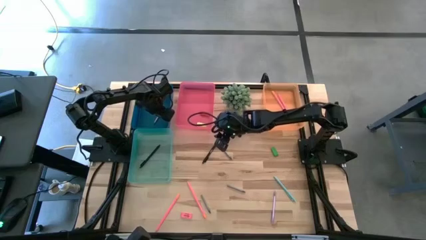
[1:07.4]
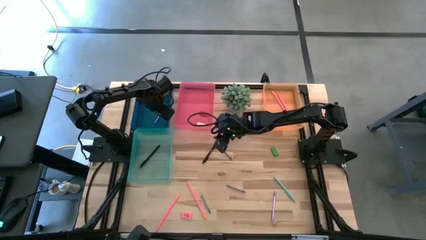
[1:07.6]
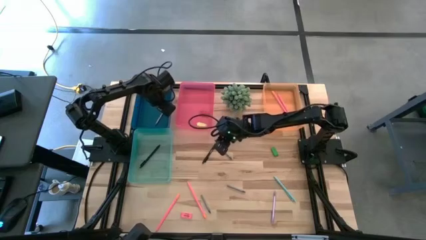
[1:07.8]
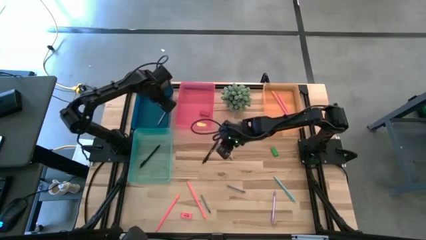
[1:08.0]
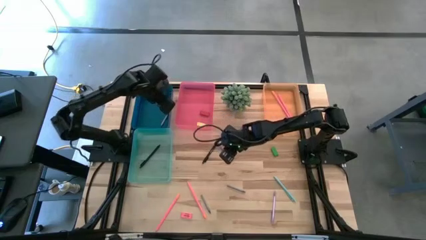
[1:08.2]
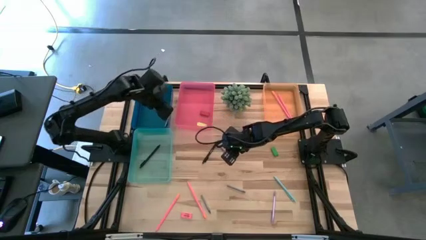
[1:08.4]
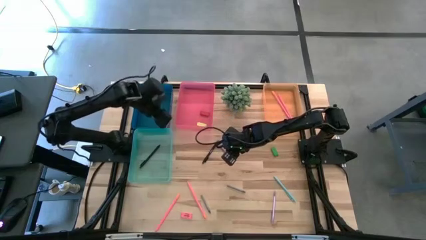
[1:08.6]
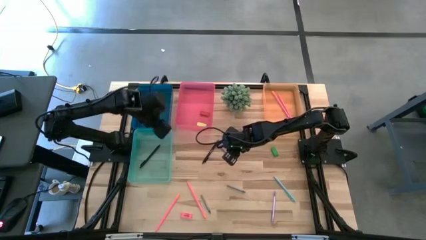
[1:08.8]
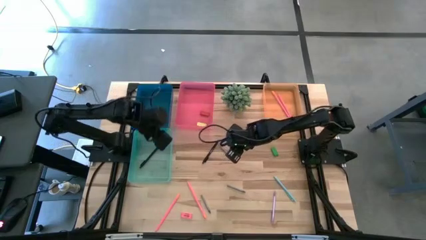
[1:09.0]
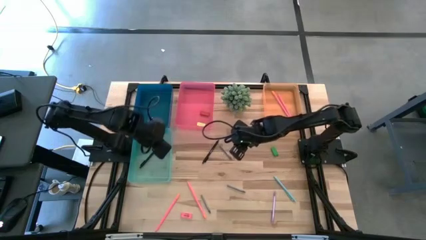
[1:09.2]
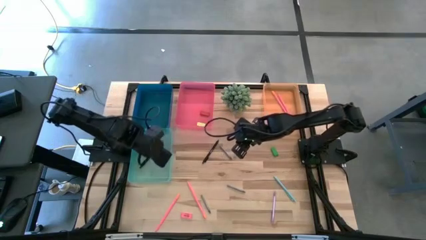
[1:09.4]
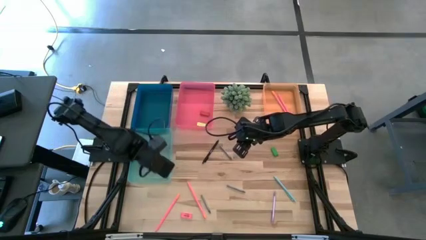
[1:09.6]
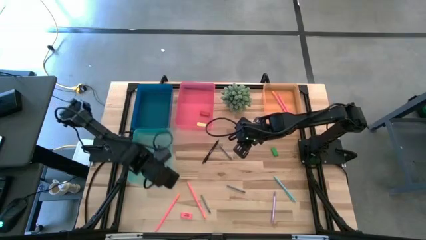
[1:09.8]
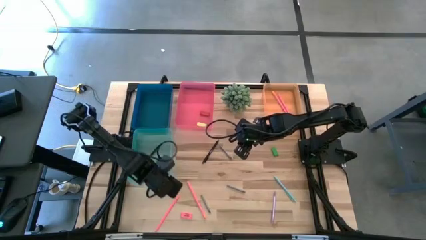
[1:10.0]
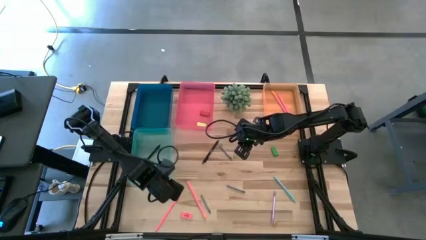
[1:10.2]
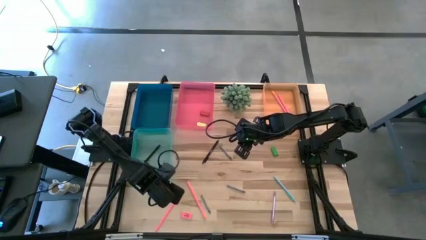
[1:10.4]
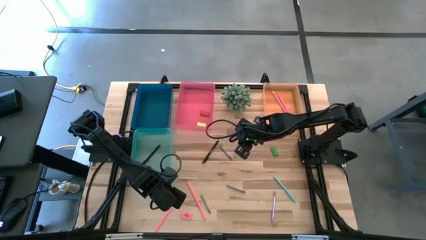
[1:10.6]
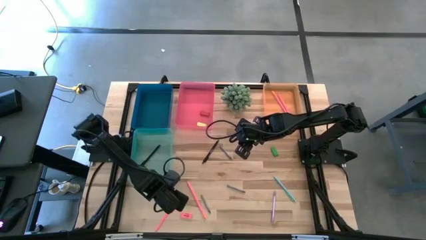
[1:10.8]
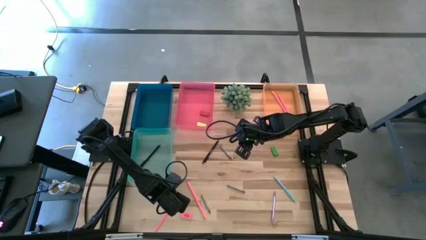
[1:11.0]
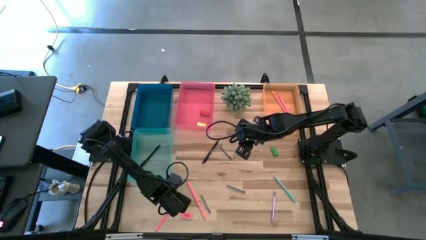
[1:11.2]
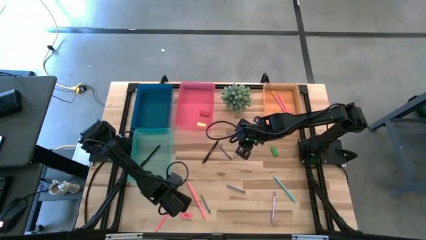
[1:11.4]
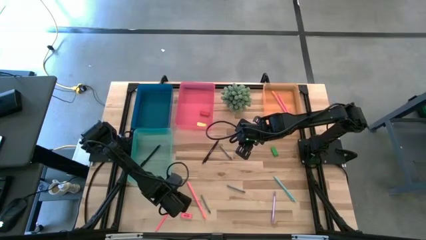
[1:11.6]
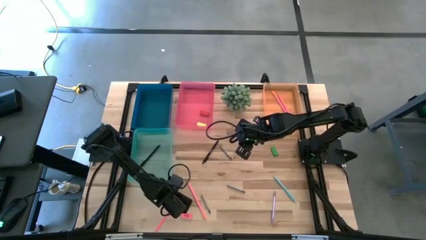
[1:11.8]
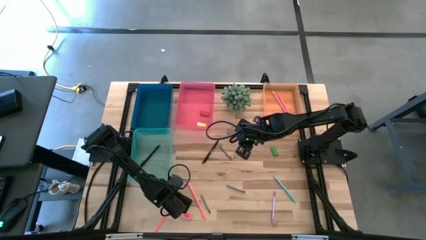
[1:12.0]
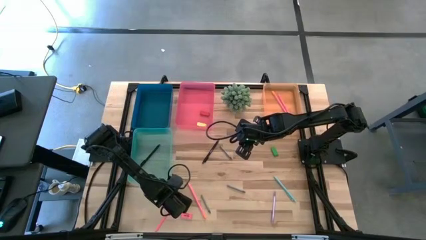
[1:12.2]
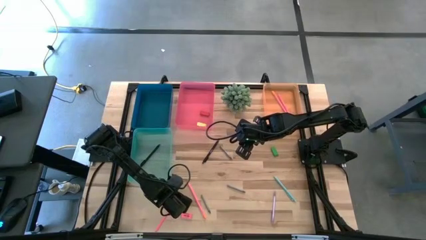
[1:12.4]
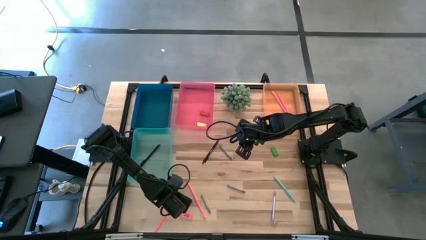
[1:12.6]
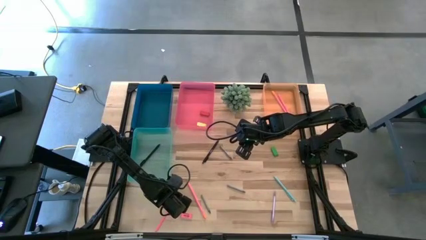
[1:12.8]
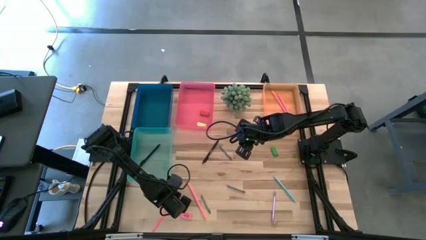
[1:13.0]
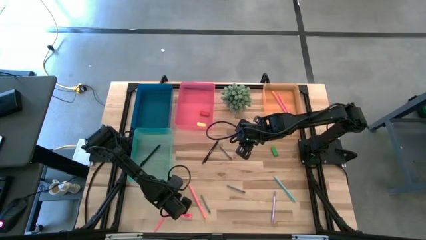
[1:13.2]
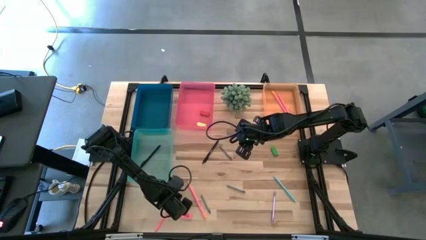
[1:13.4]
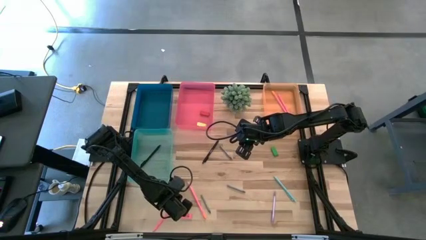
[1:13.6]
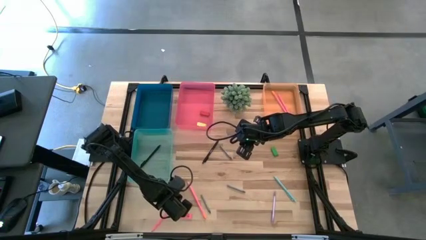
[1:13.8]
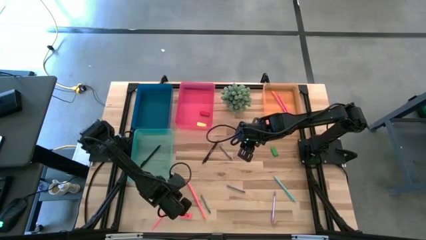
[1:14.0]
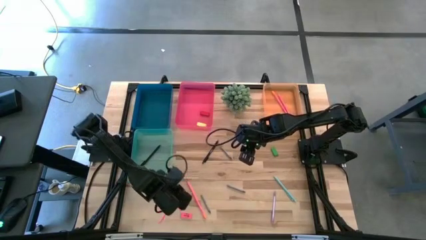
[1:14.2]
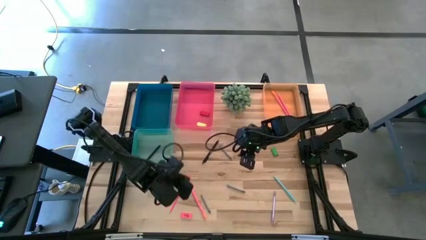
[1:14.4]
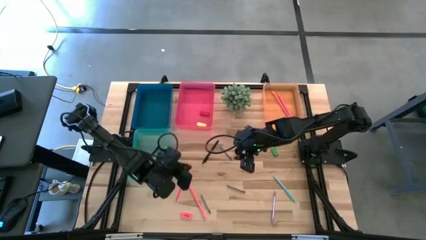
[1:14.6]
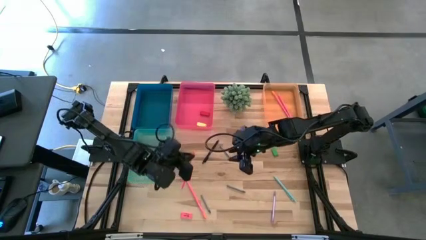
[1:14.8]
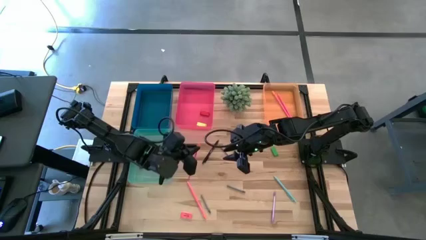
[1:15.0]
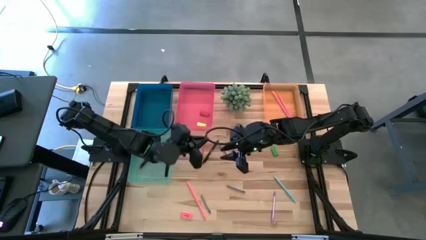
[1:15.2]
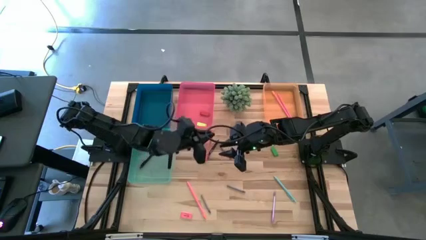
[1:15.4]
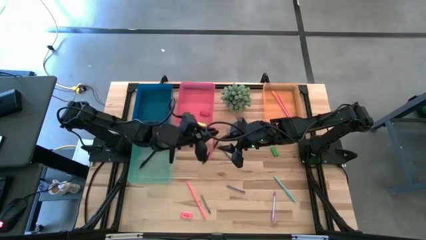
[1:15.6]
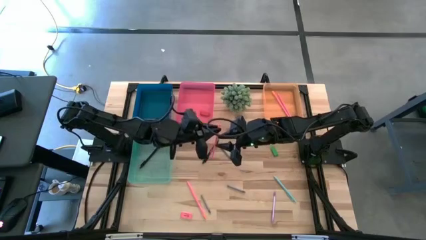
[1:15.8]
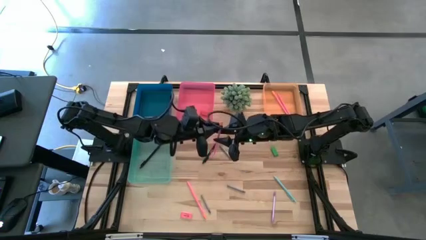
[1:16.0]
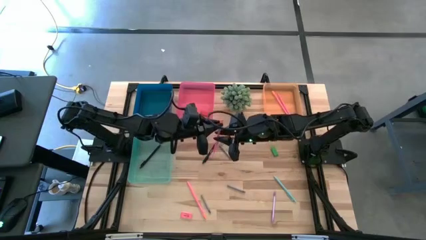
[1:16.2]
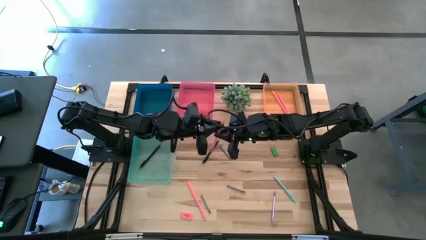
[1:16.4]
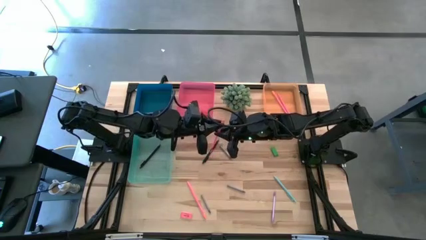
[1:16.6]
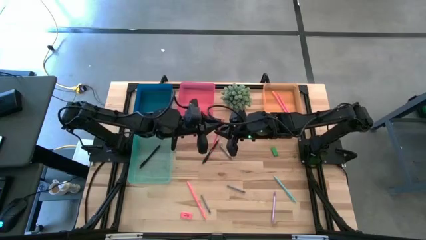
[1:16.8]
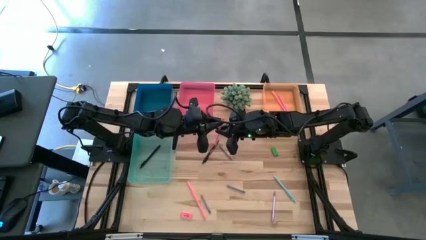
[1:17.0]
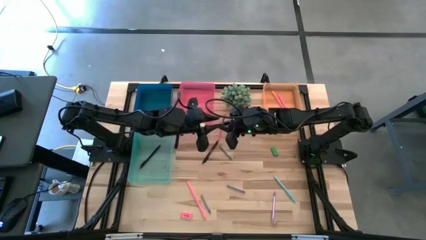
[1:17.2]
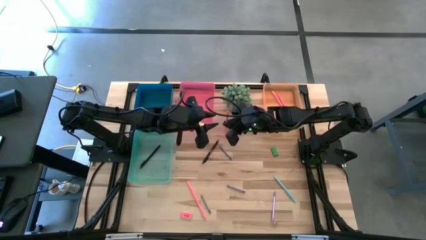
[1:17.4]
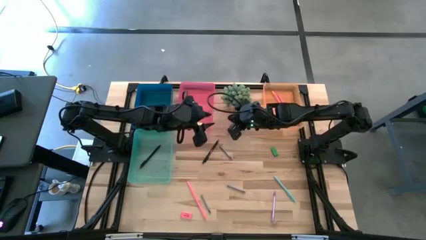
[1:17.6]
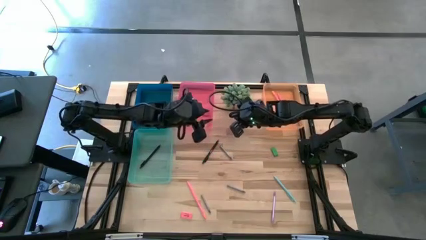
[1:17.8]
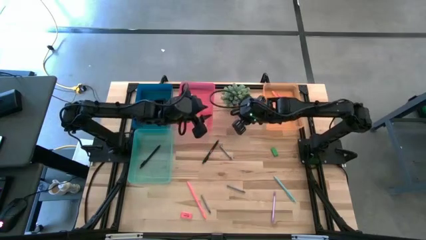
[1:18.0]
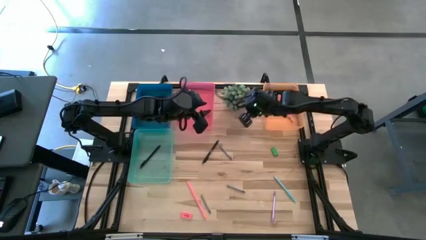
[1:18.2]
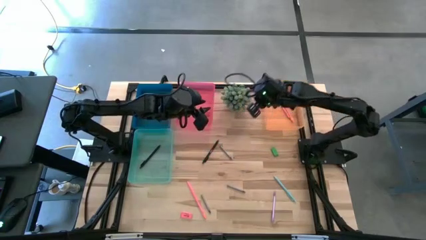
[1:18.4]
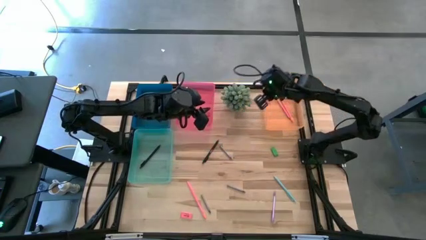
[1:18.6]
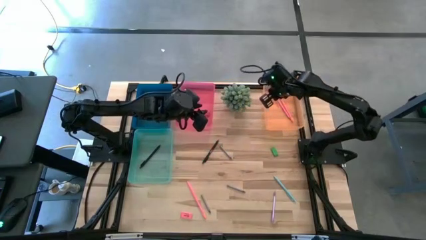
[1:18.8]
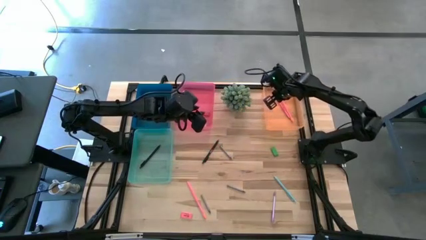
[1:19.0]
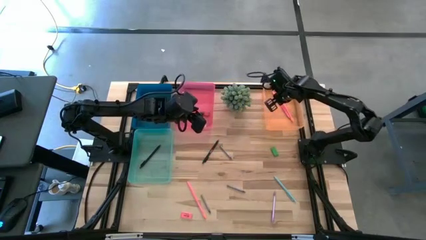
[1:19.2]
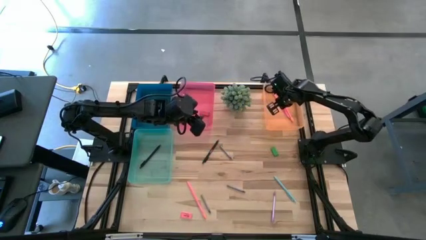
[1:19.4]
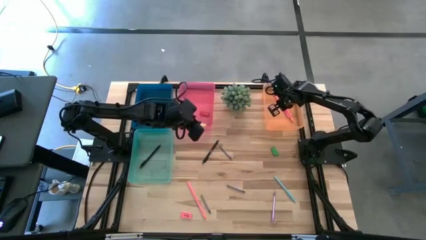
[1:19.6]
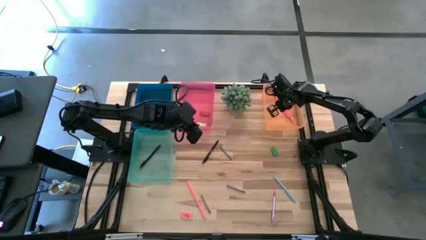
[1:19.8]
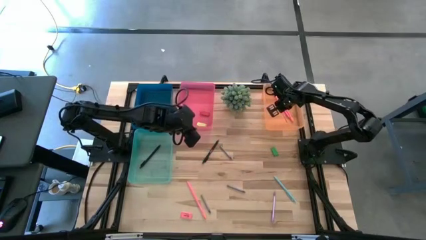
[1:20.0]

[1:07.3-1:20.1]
Task: Sort crayons/erasers/pens/pencils in bins
Put the pink pencil into the orange bin

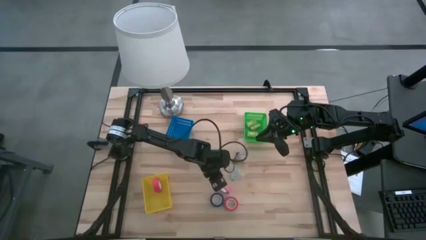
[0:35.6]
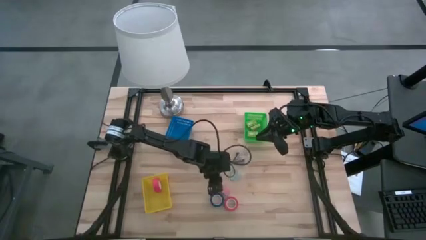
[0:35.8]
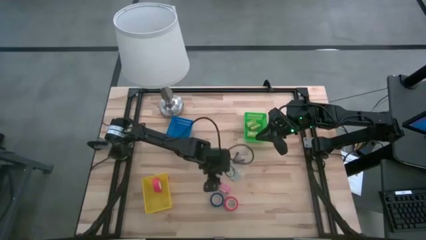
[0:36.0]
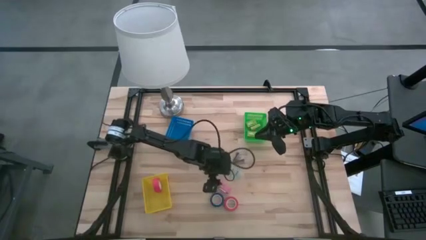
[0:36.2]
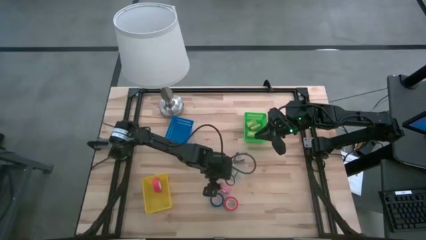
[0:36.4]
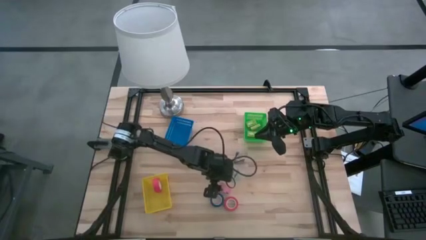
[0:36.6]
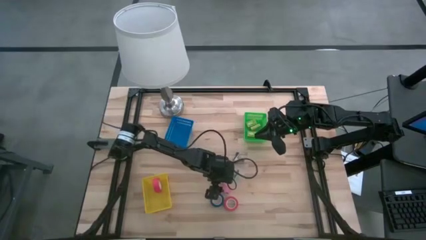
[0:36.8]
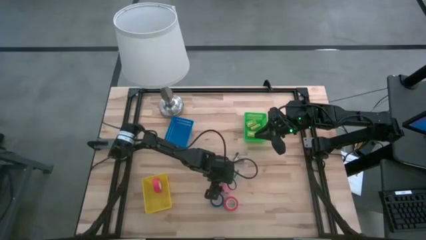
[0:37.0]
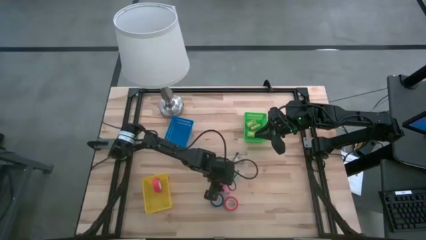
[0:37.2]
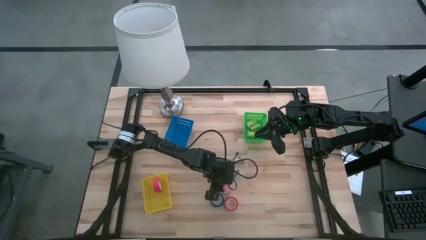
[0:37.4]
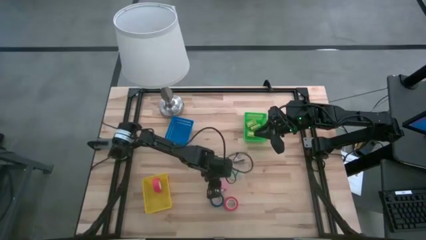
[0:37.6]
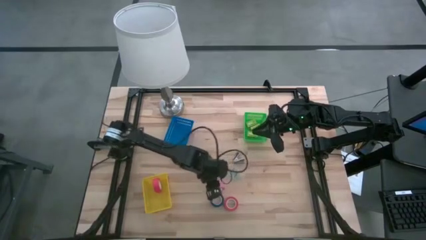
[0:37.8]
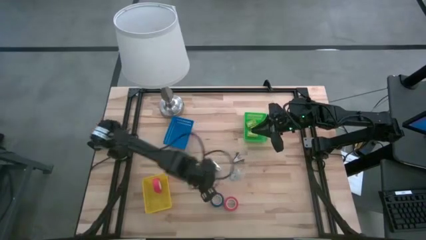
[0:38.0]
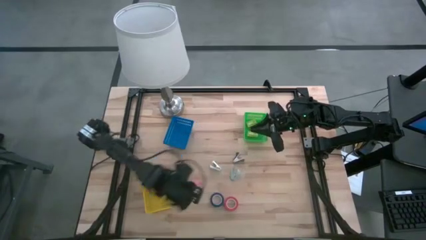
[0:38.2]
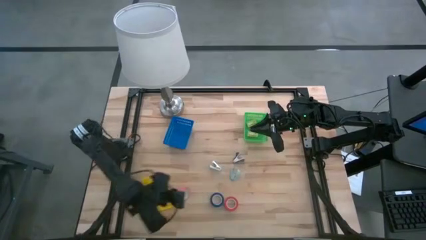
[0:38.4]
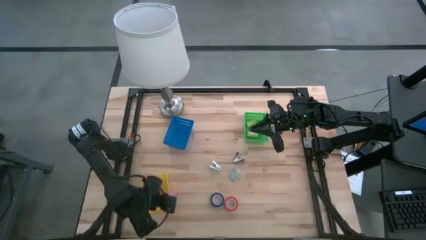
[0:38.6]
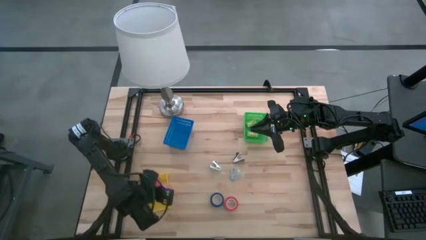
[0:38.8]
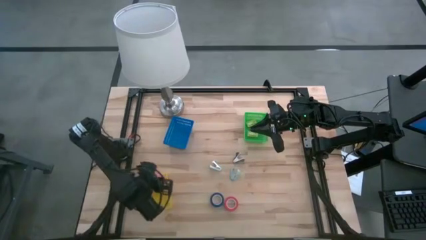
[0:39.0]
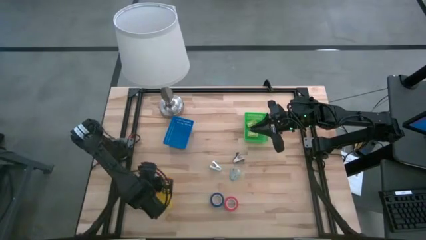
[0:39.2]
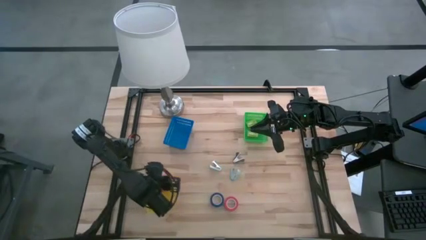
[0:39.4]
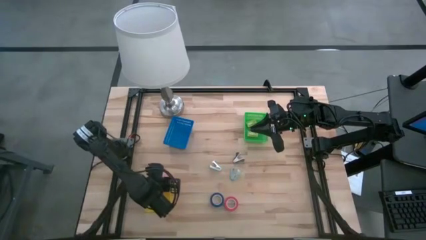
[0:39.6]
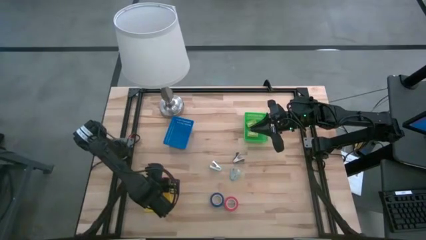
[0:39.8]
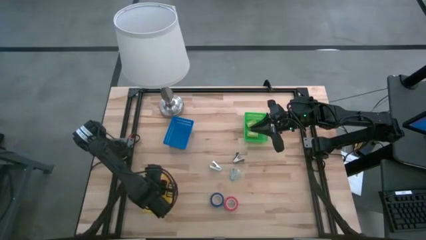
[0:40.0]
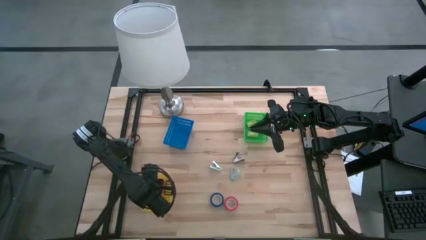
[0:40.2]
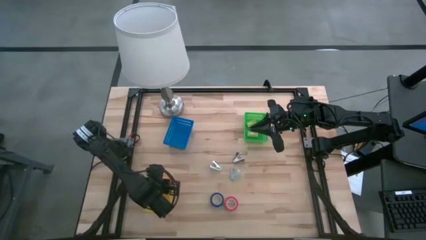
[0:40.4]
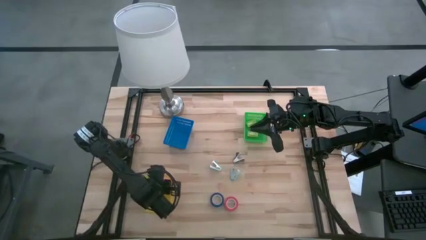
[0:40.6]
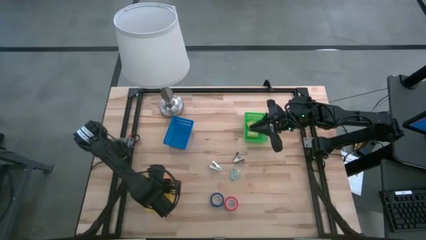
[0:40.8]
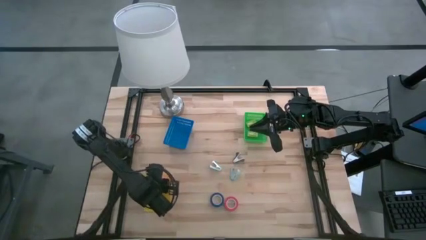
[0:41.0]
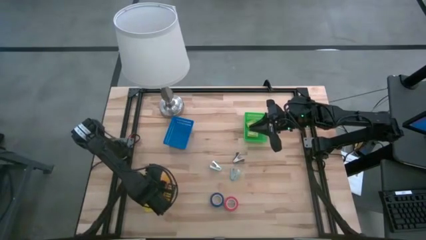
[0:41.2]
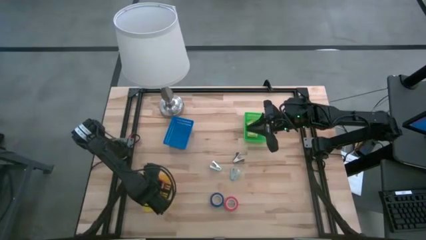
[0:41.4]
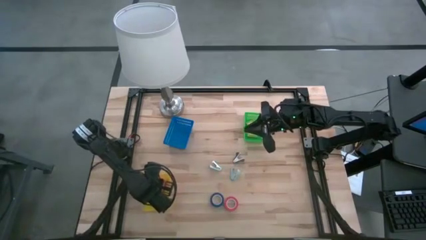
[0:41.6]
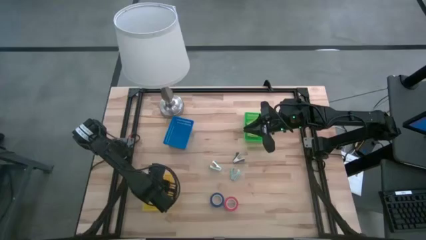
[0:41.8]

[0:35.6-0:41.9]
Task: Pick and place Stapler, Stapler remover, tape
Put the pink tape into the yellow bin
